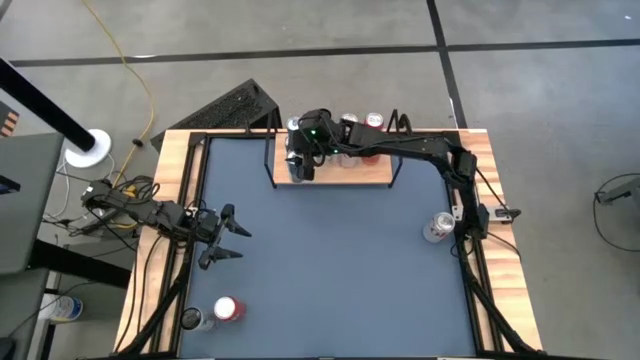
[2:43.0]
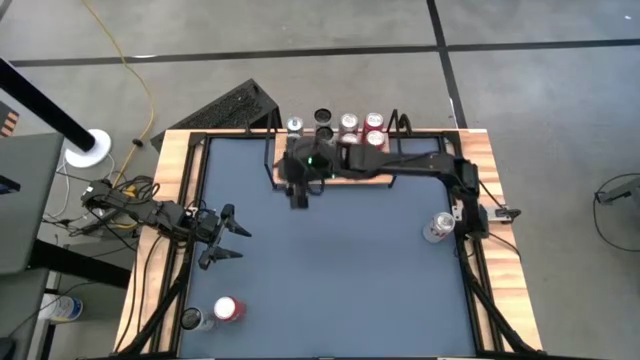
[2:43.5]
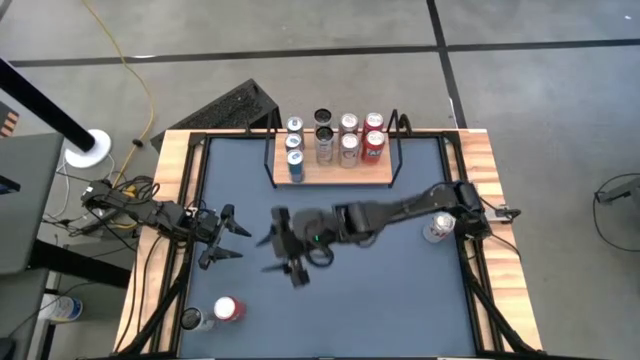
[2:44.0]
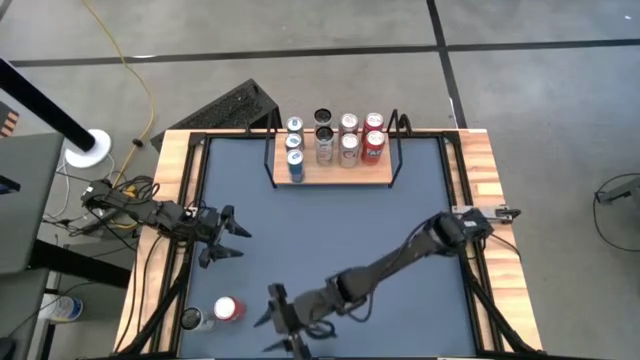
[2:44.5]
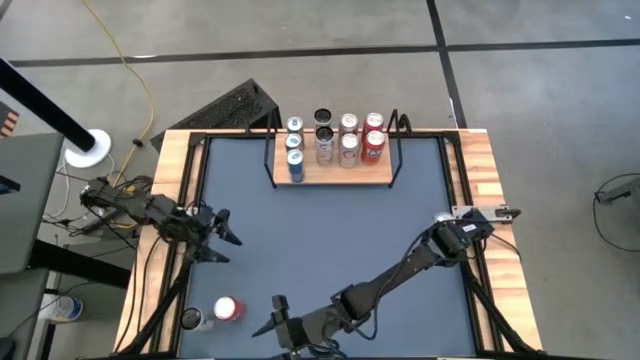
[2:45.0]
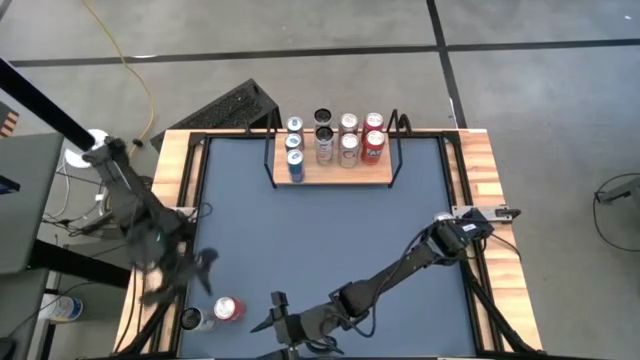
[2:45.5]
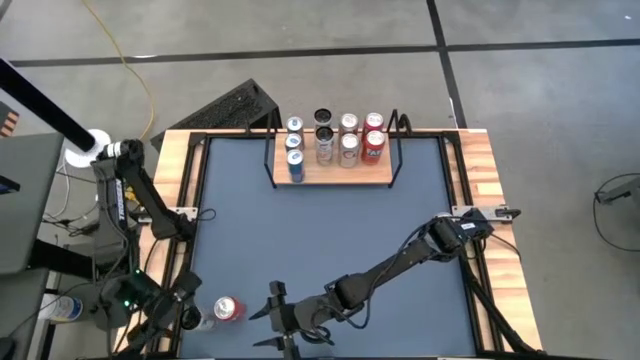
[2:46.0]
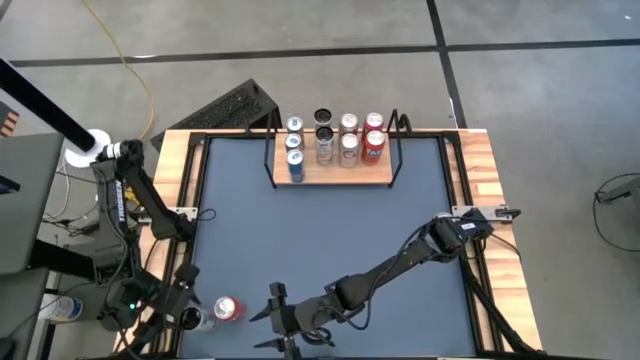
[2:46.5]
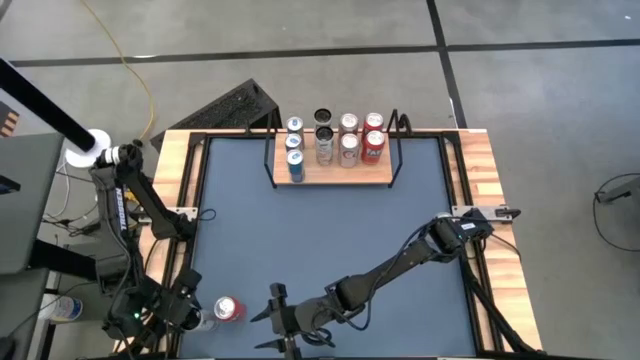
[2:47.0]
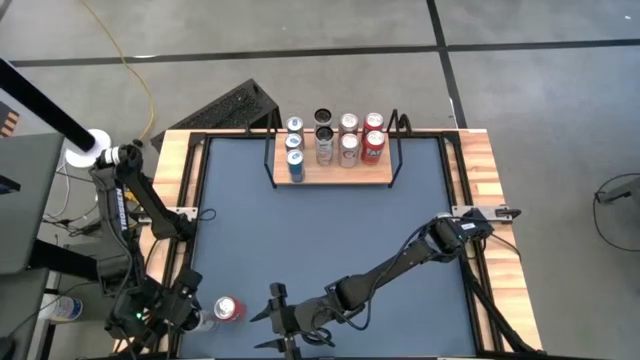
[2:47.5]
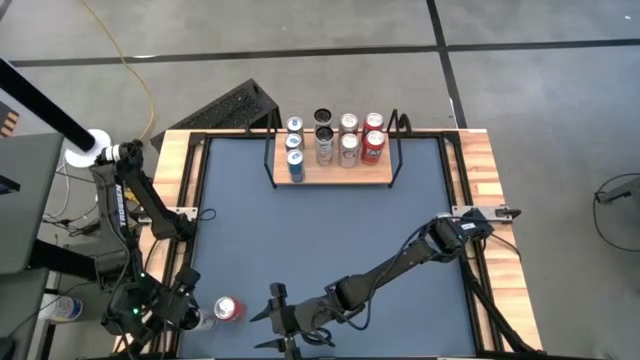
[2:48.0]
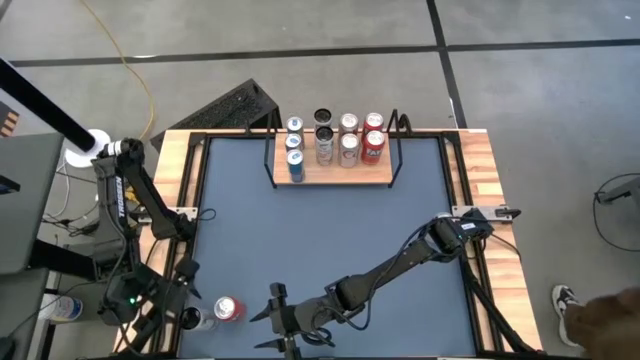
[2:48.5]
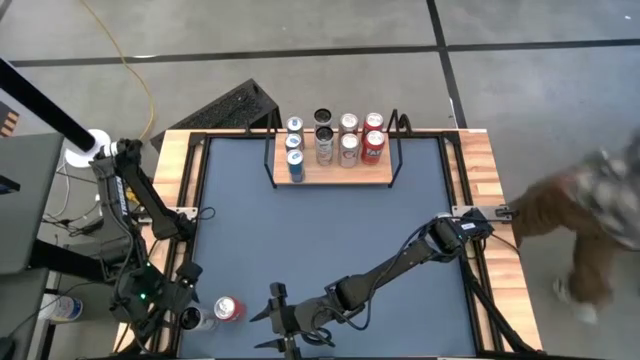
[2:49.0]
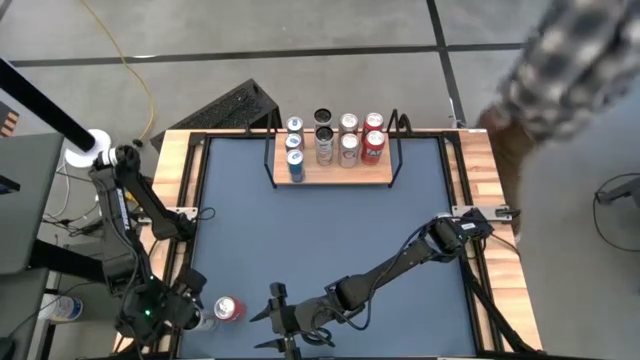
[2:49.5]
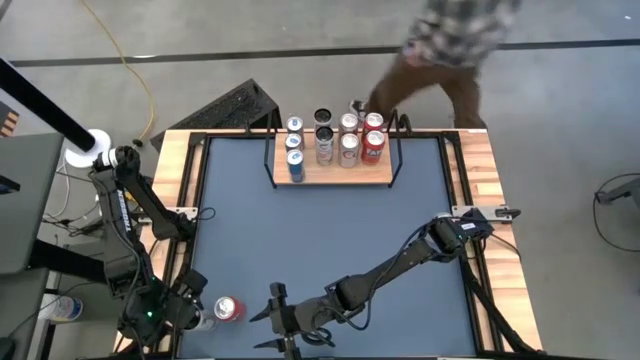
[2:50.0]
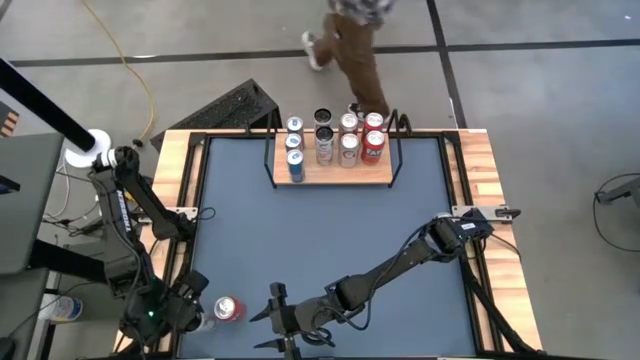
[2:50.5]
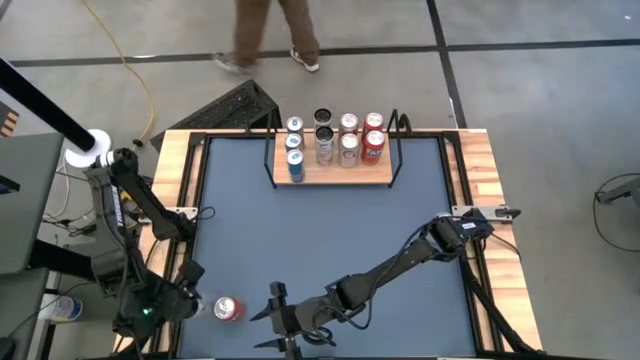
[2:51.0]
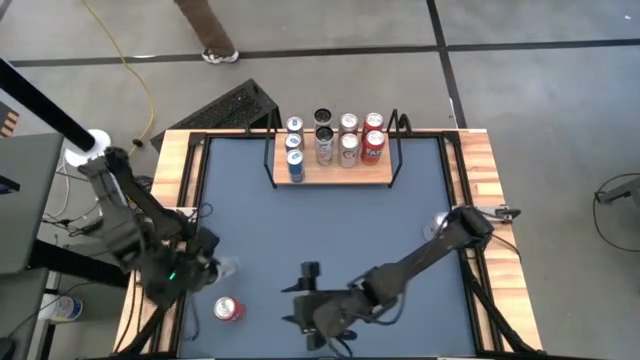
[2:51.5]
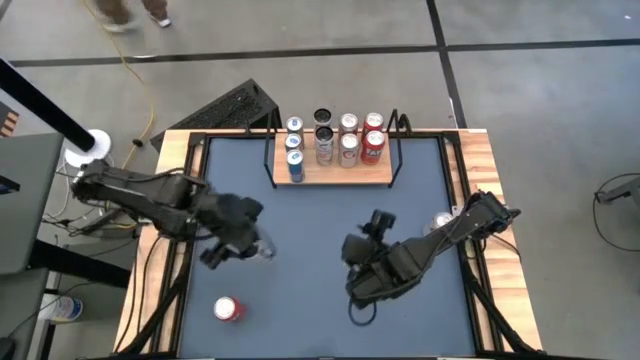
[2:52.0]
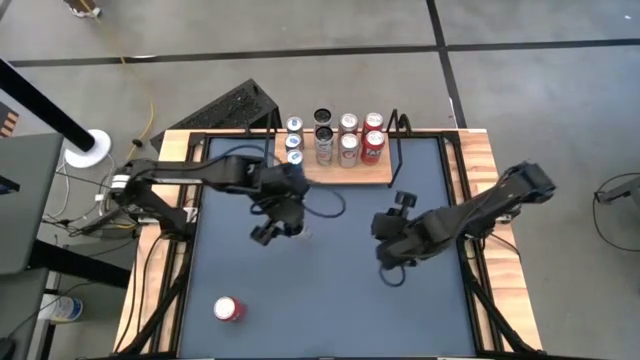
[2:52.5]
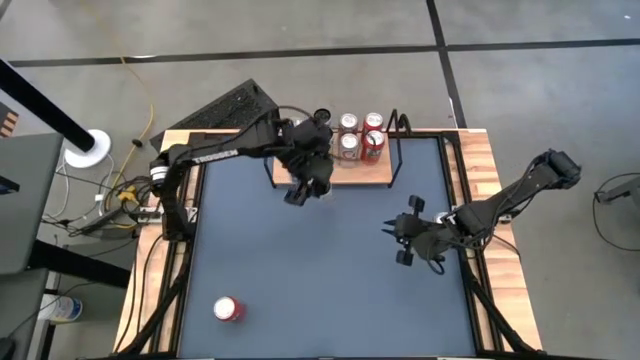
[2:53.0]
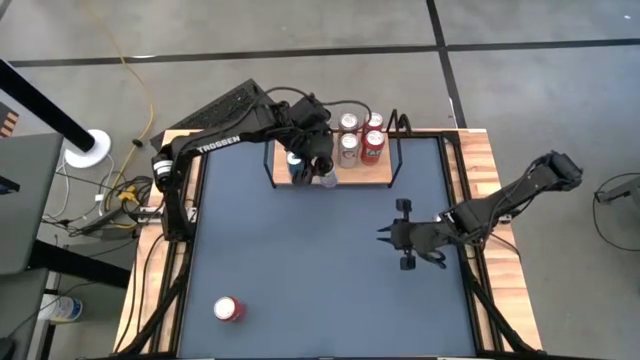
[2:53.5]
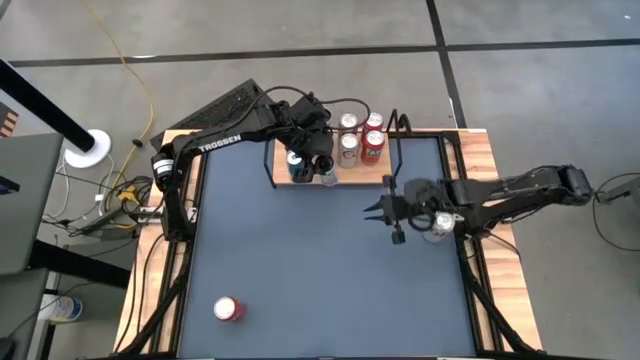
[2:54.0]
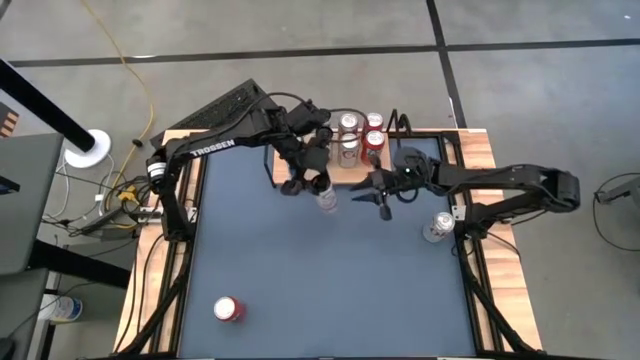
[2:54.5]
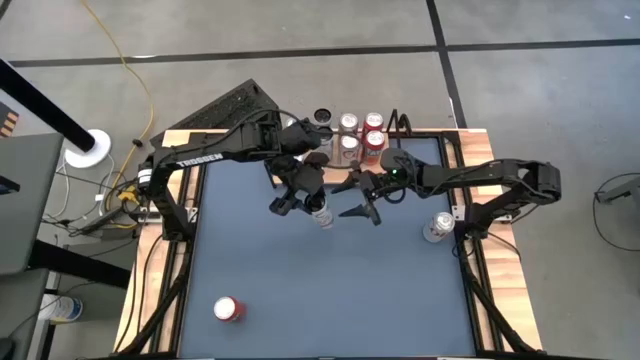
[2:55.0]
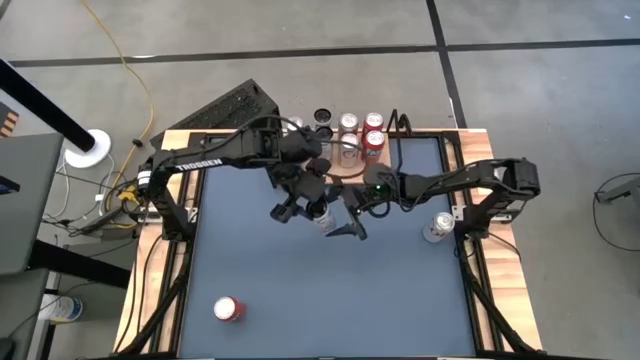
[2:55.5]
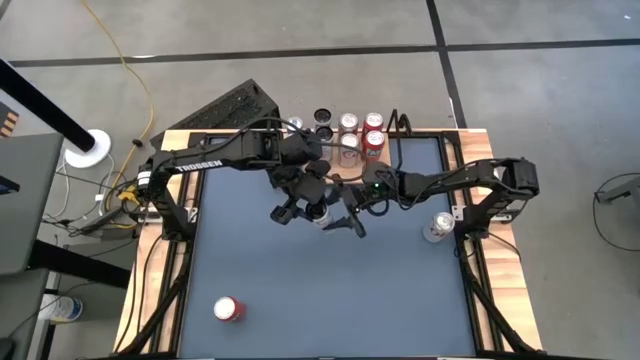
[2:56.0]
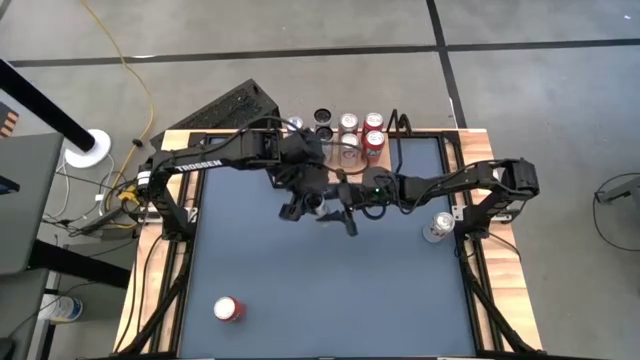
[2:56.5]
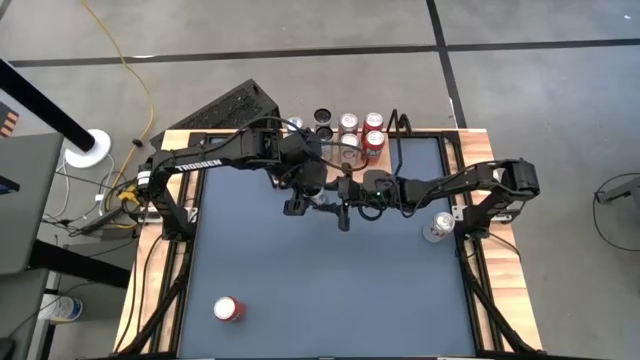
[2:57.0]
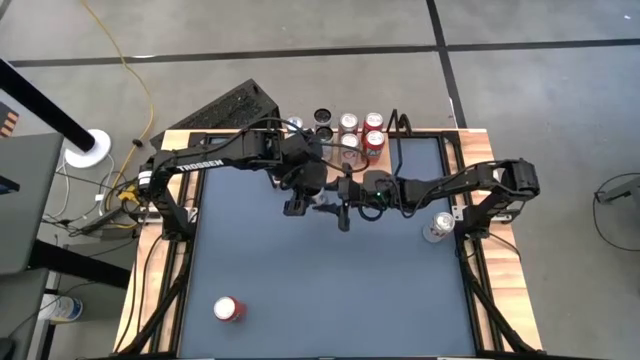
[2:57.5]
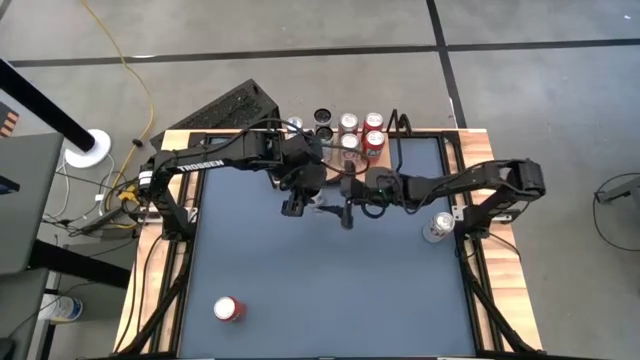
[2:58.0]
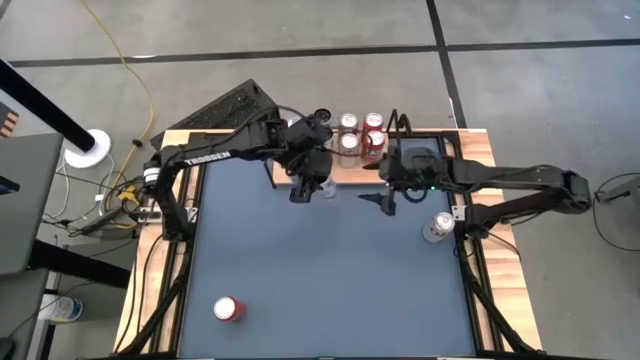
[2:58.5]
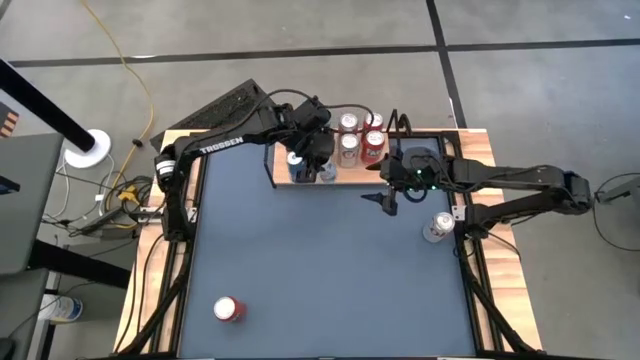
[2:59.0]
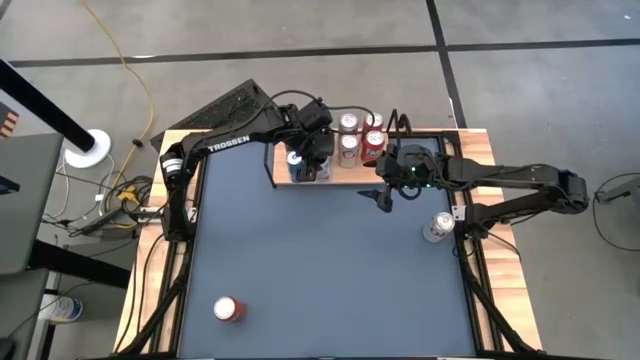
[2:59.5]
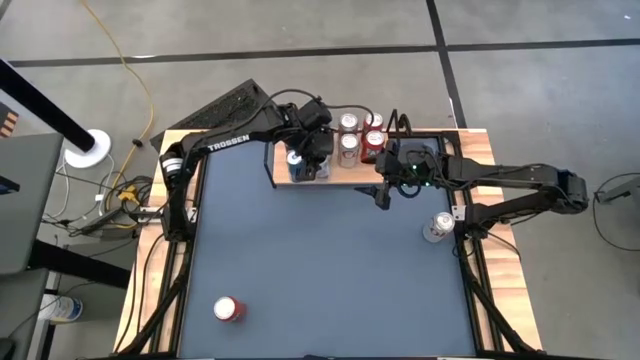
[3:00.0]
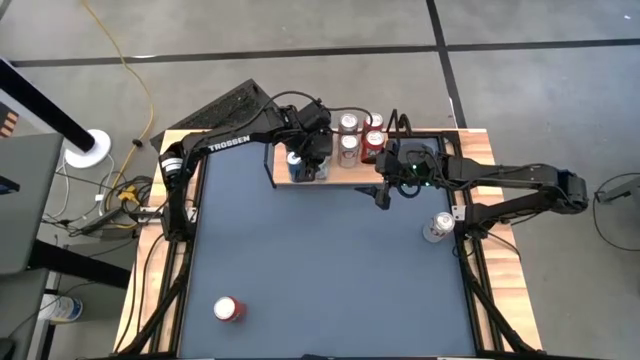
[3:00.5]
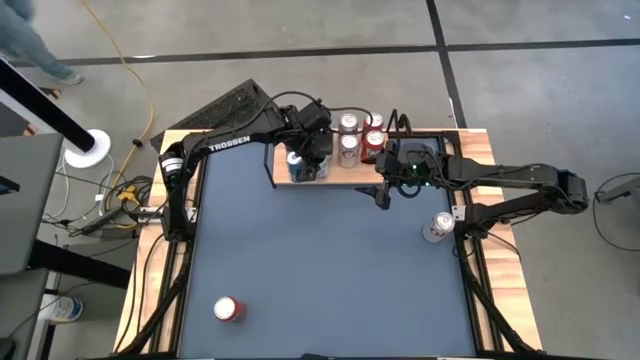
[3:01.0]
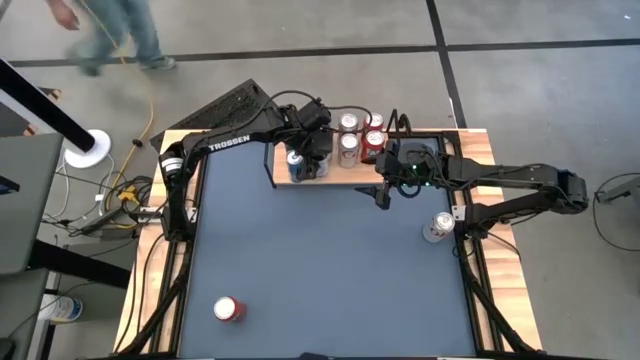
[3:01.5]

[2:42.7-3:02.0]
Task: Place canned beverage on shelf
Put the white-pink soda can on the shelf aligned with the other white-pink soda can

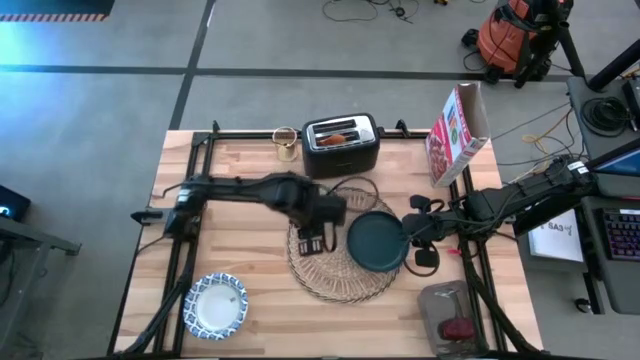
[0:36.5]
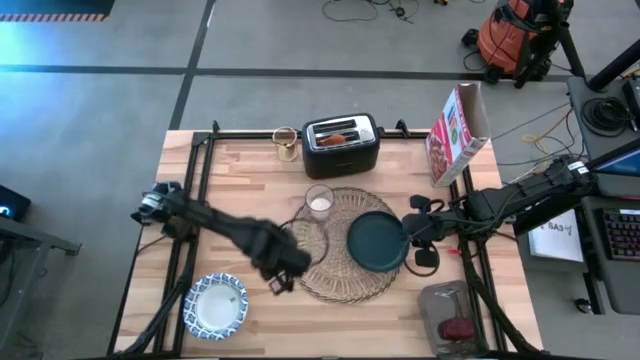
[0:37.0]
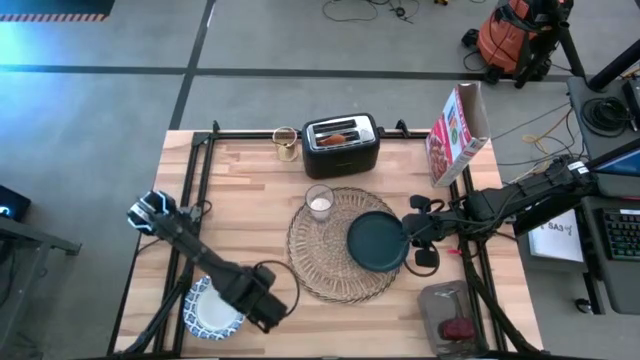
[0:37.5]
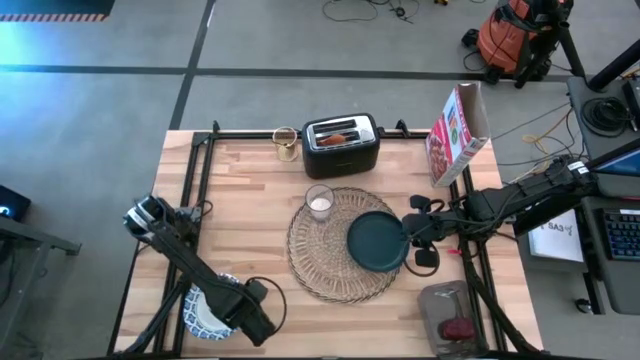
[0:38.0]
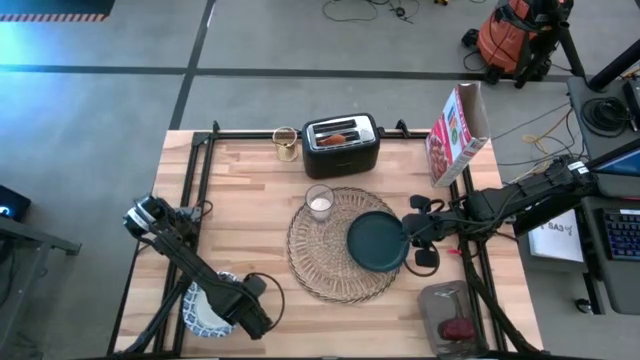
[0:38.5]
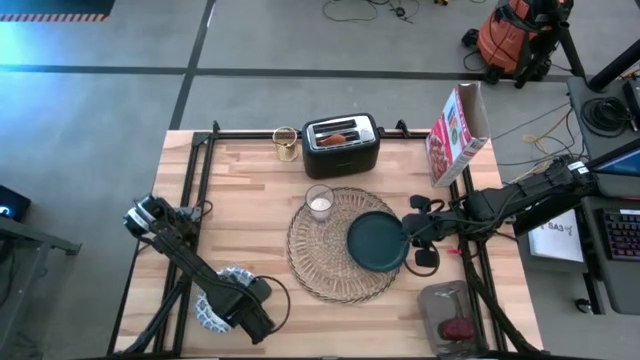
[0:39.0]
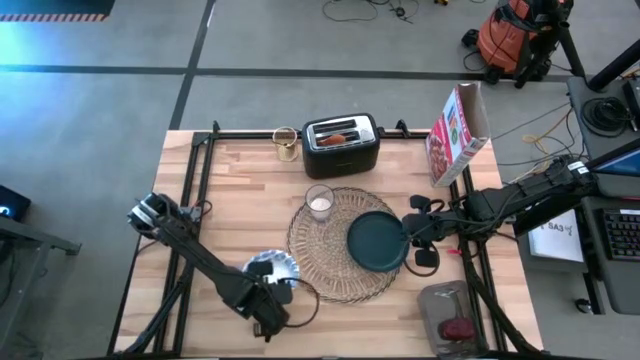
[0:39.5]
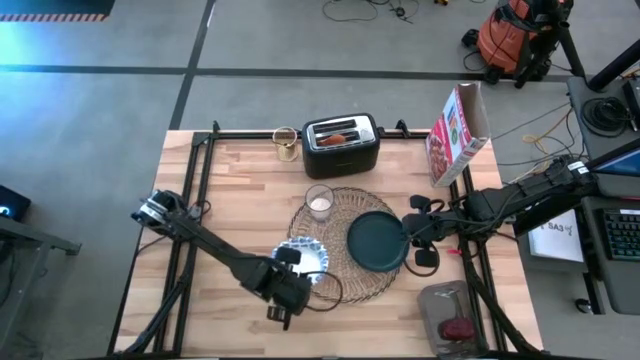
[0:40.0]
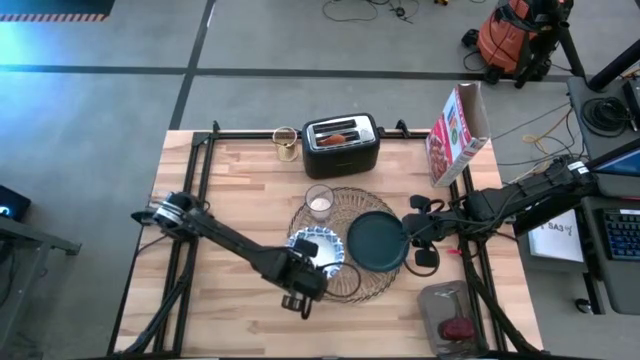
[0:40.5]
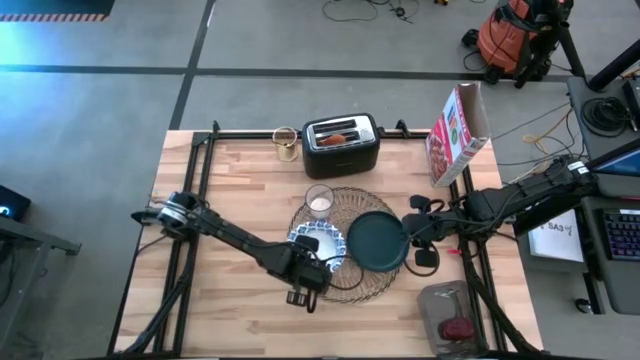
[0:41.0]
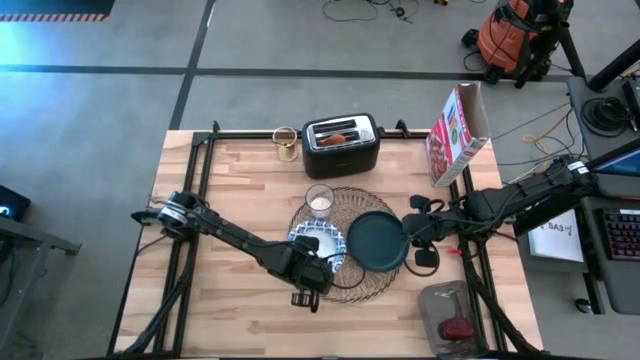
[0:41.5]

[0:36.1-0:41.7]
Task: Arrange a breakfast setting
Put the white and blue bowl on the left of the brown place mat
